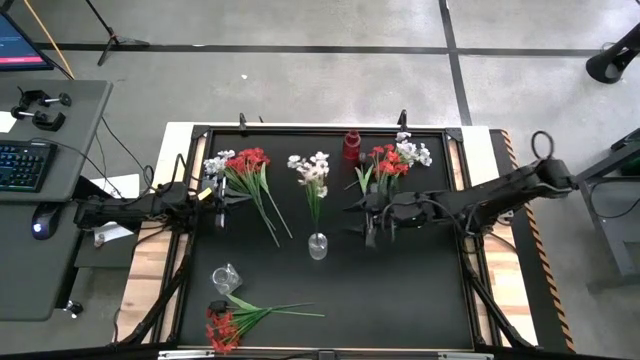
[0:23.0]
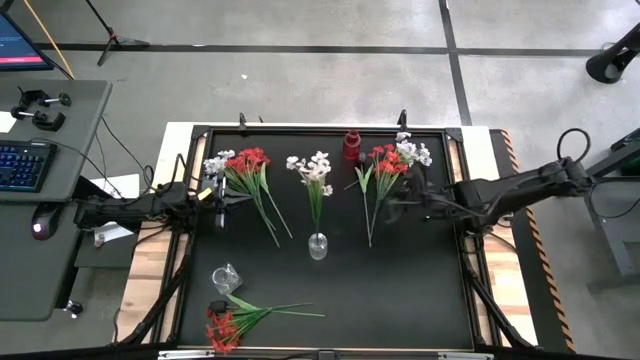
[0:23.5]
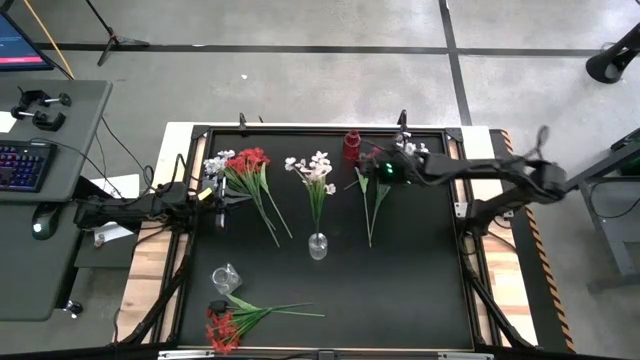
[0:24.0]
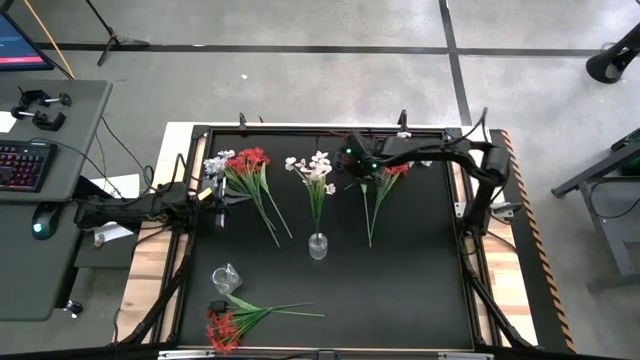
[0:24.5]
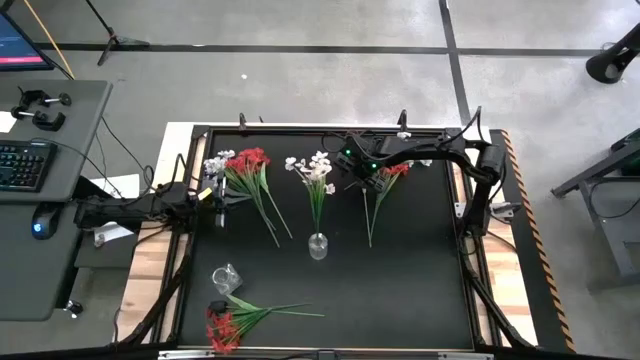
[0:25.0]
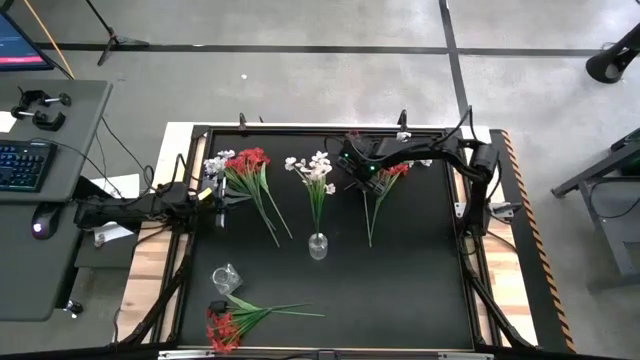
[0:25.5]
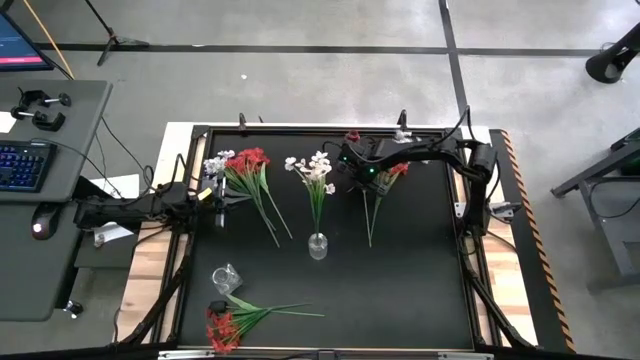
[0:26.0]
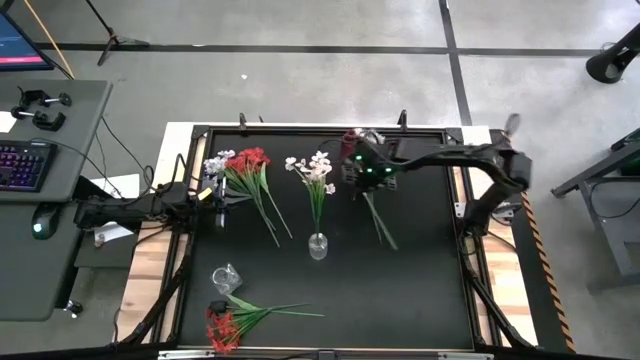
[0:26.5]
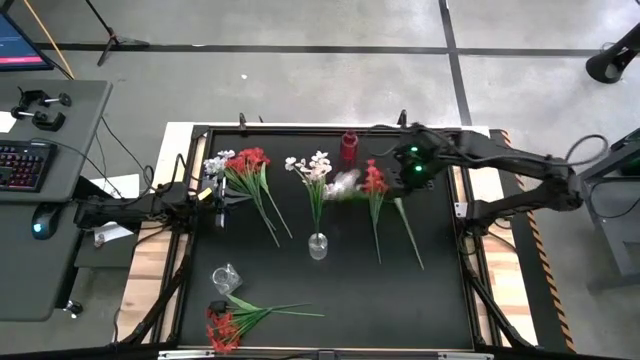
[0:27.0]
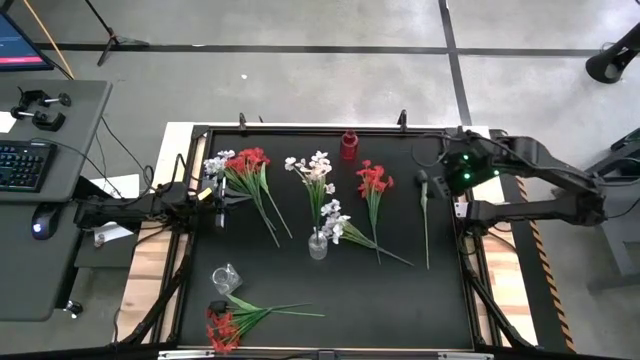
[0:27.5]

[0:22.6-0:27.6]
Task: Sort flowers into vase by color
Put the right white flowers into the right transparent vase

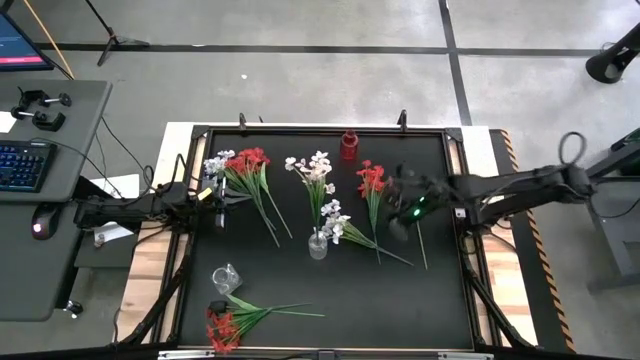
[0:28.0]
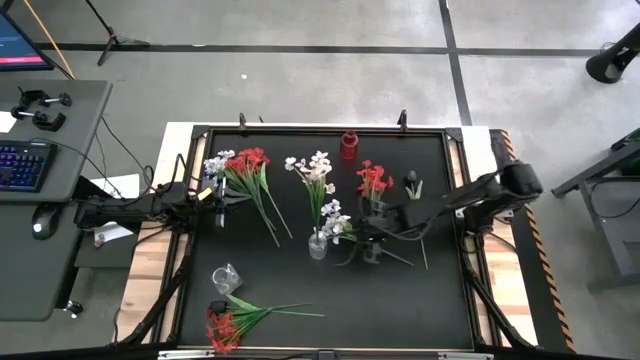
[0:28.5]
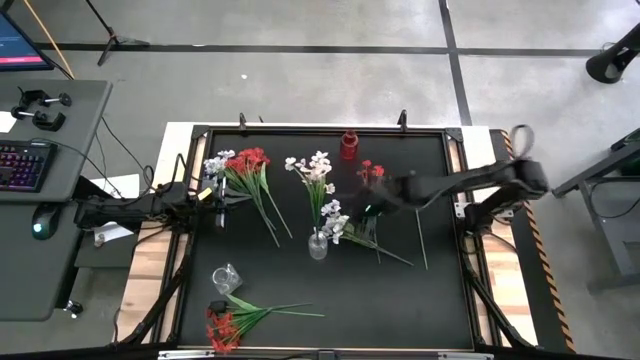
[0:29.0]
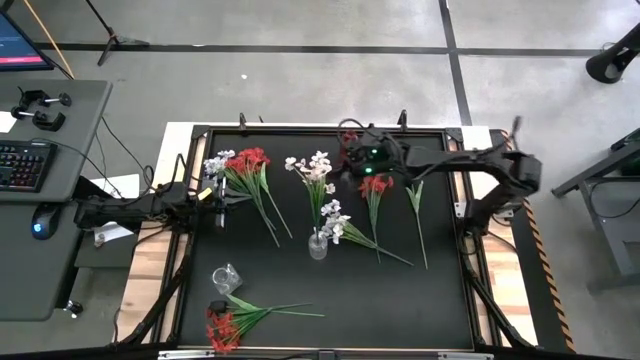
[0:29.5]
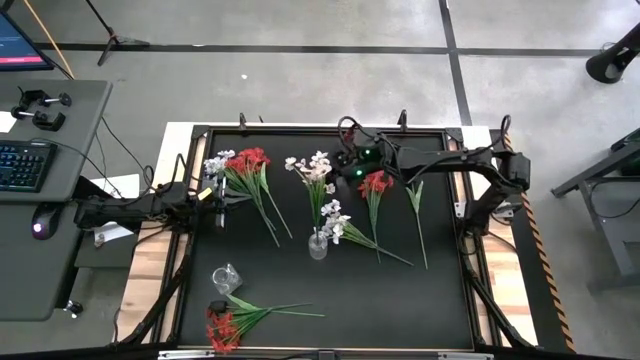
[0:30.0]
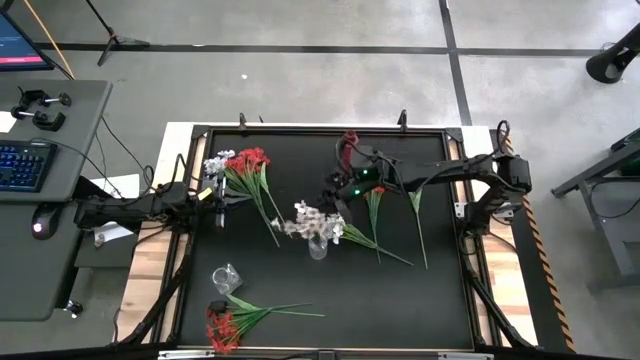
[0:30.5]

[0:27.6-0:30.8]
Adjust the white flowers in the right transparent vase

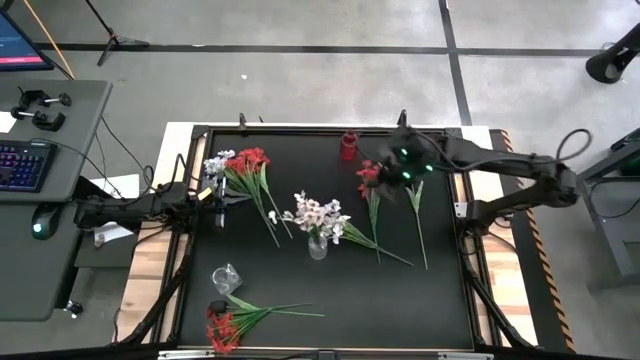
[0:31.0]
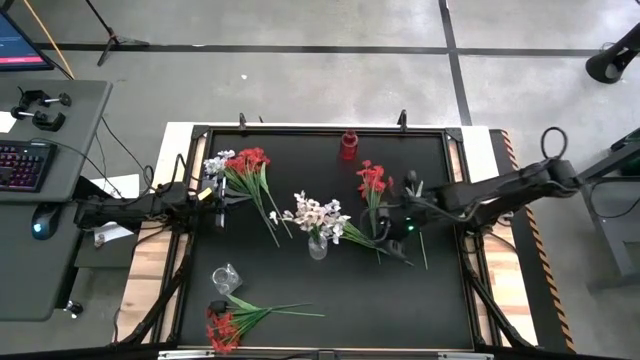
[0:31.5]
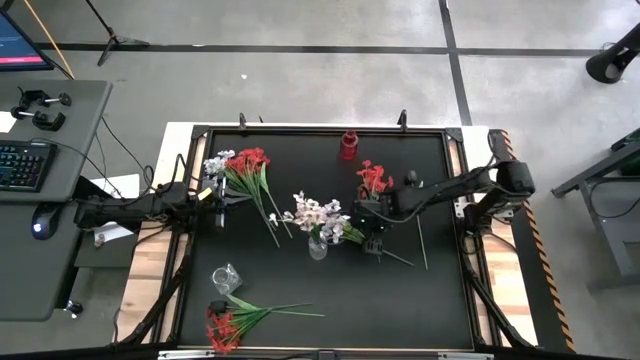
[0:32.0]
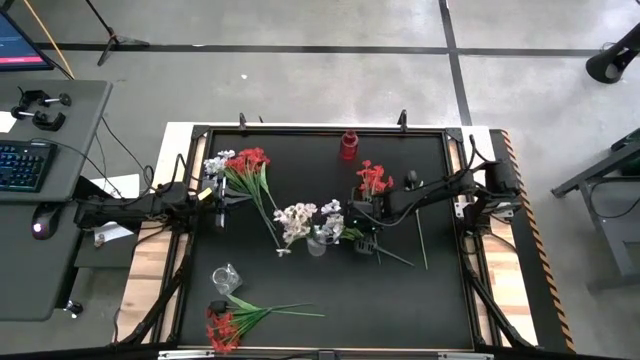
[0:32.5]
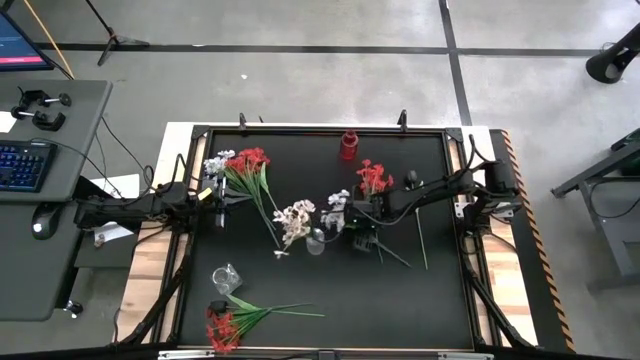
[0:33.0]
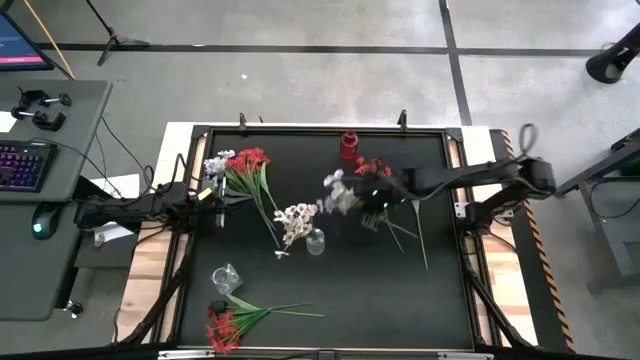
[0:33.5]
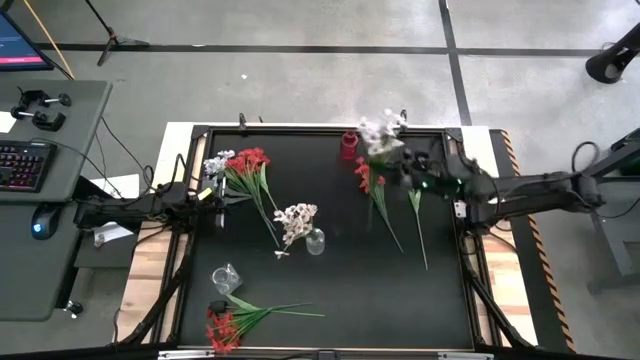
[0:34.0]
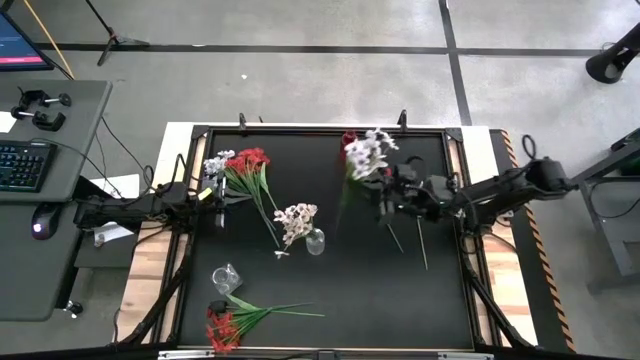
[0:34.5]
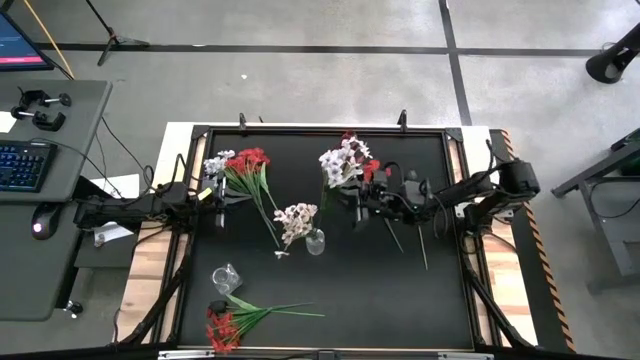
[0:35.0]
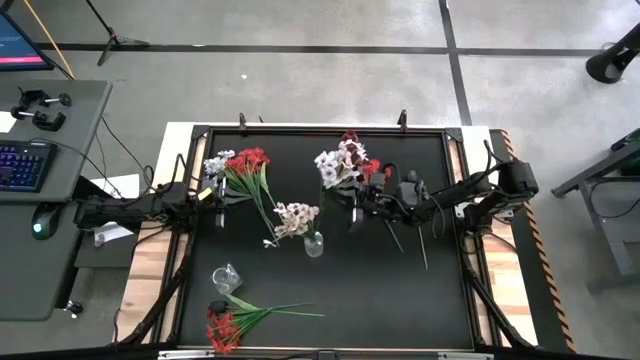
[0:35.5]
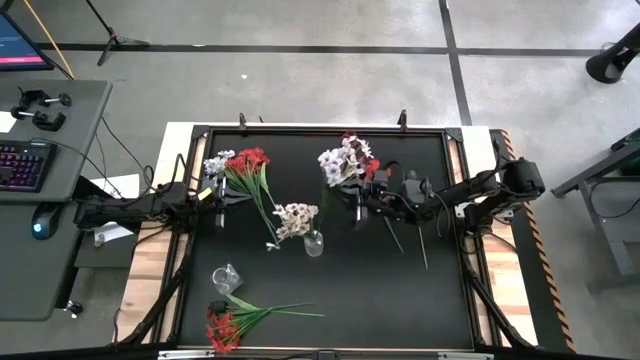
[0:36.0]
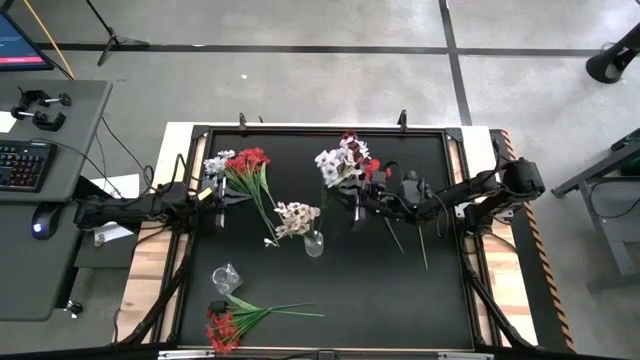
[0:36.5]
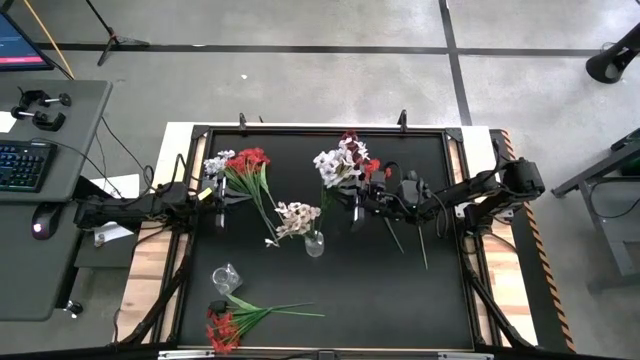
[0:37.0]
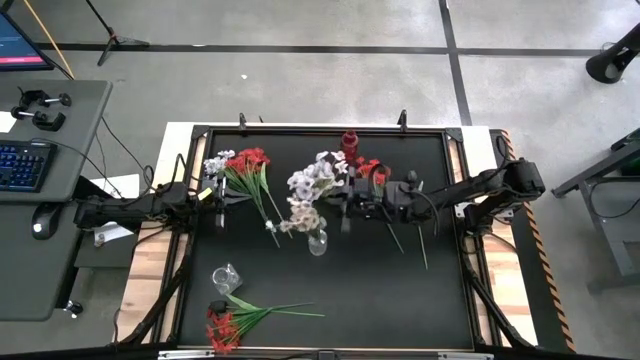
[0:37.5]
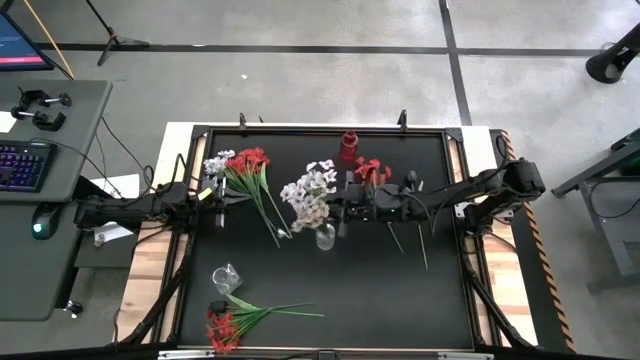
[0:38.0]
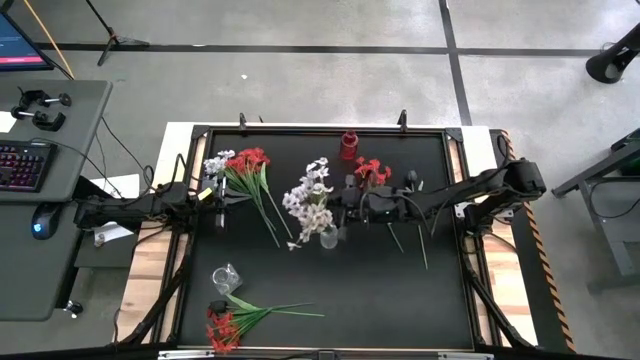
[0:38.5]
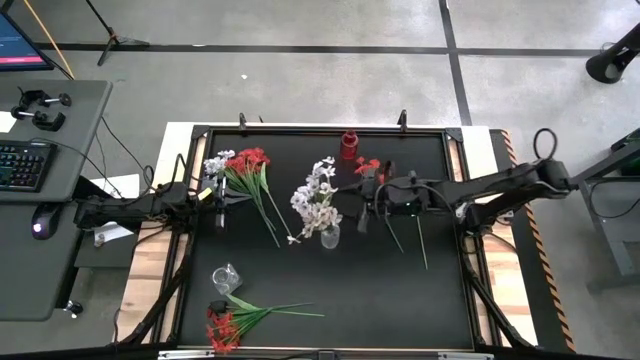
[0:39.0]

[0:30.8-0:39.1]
Put the right white flowers into the right transparent vase

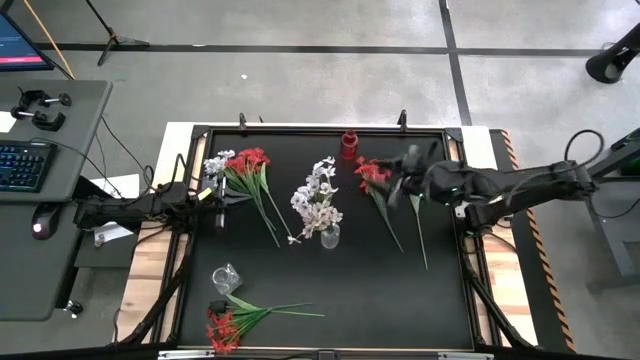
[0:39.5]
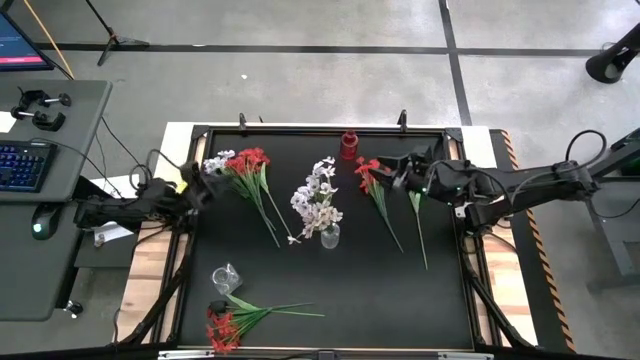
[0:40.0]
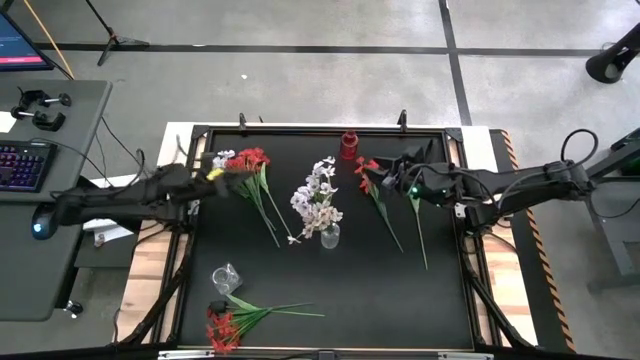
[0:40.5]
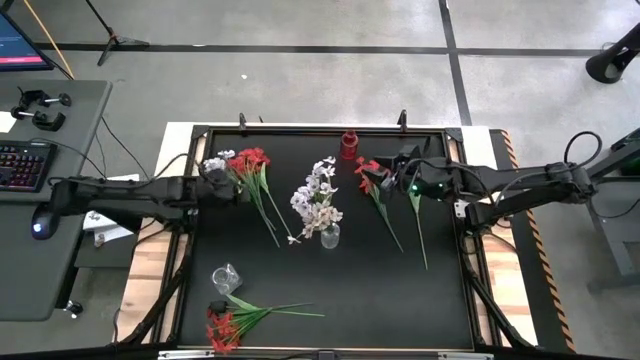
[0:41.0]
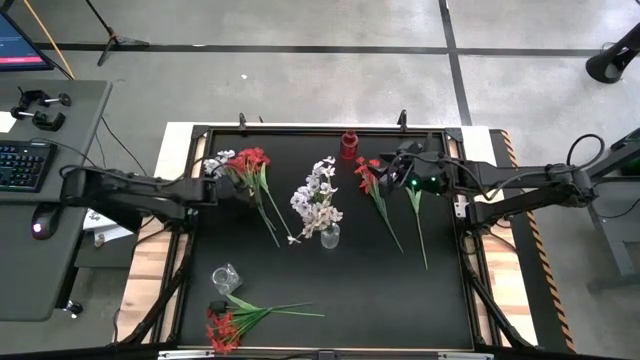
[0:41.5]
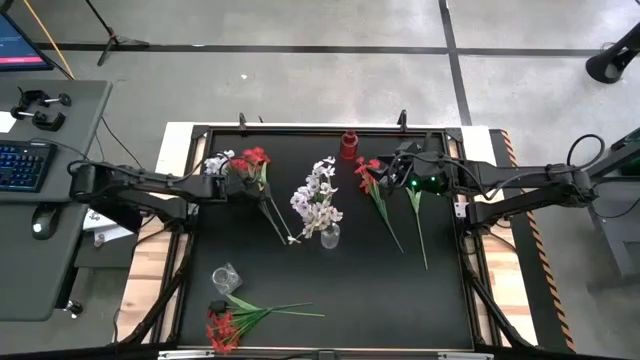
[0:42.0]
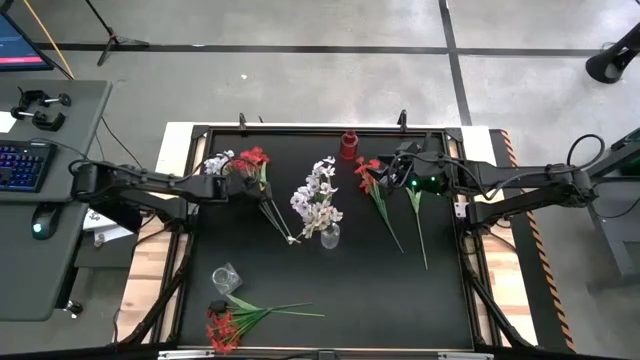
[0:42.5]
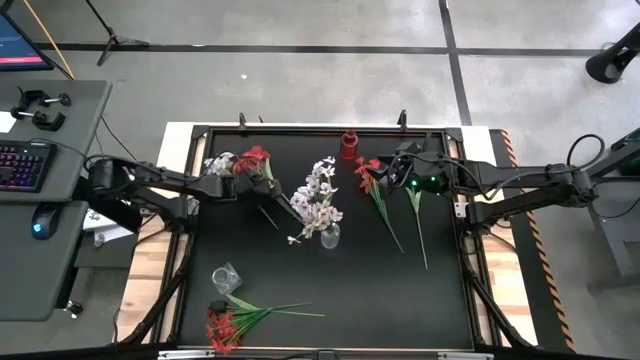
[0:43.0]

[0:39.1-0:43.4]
Adjust the top left red flowers

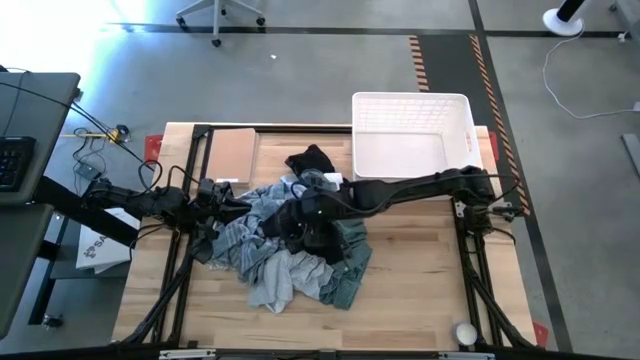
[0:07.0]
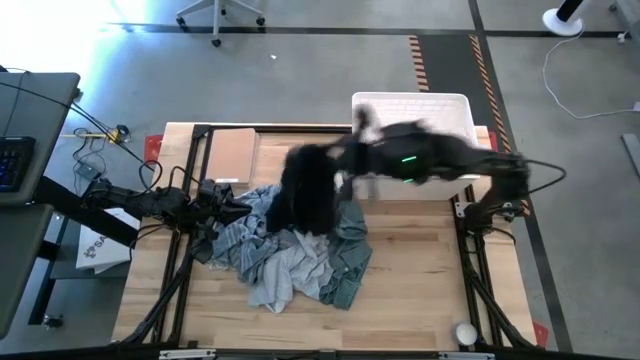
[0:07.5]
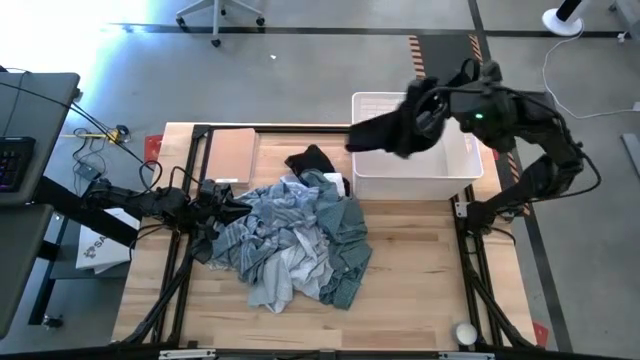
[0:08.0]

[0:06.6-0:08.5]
Task: Sort clothes
Put the black boxer into the white laundry bin
